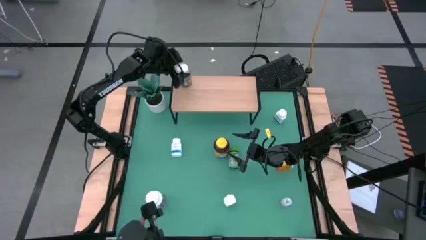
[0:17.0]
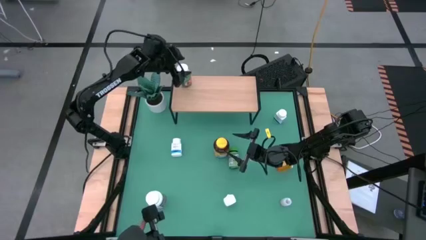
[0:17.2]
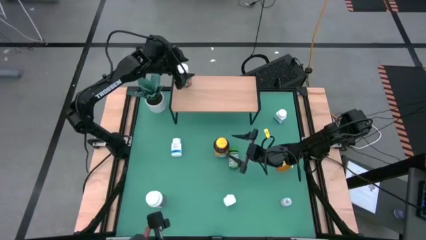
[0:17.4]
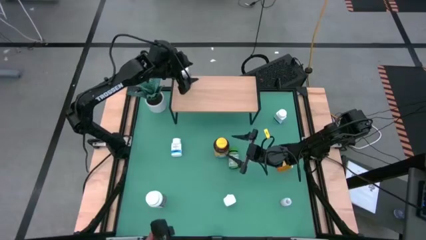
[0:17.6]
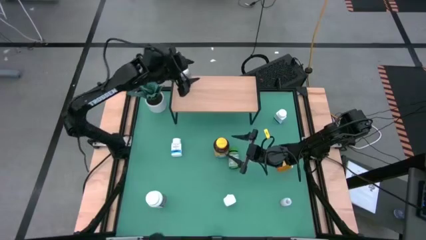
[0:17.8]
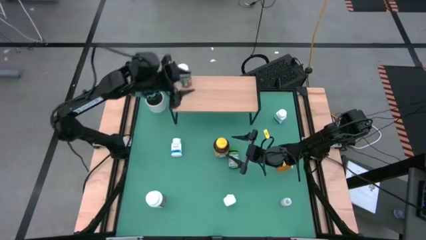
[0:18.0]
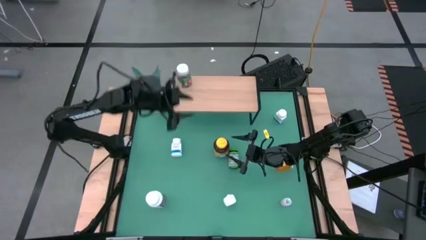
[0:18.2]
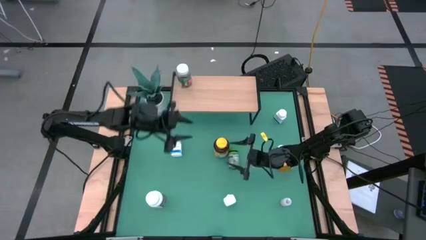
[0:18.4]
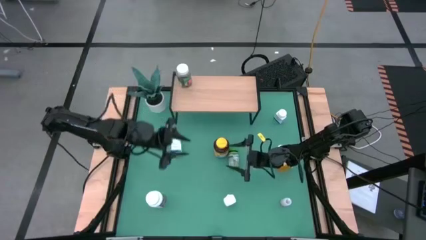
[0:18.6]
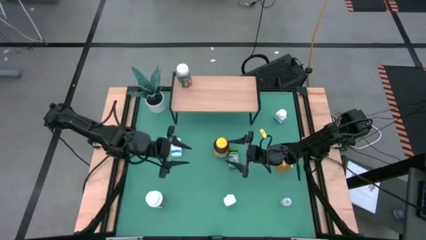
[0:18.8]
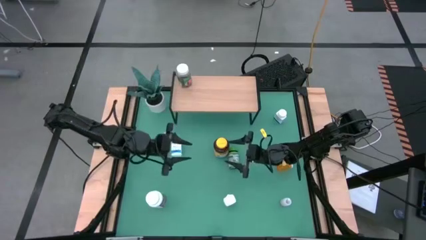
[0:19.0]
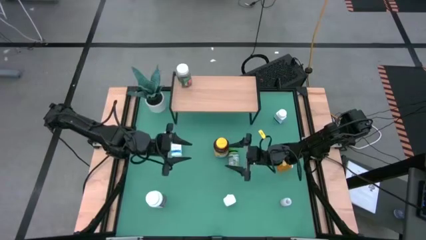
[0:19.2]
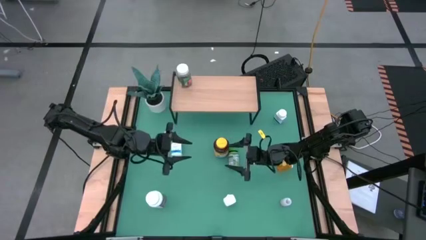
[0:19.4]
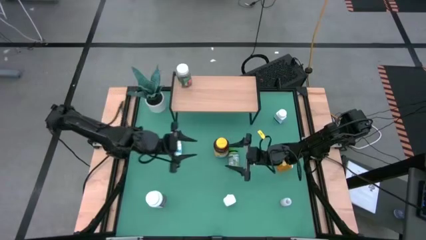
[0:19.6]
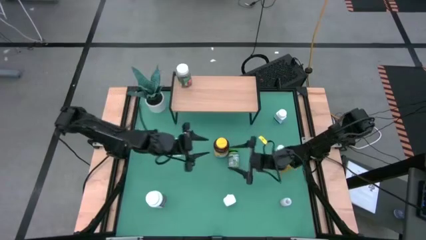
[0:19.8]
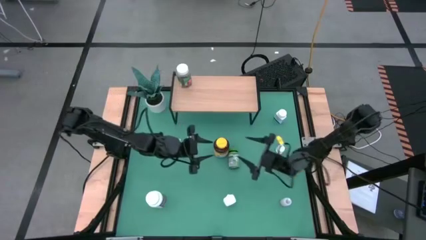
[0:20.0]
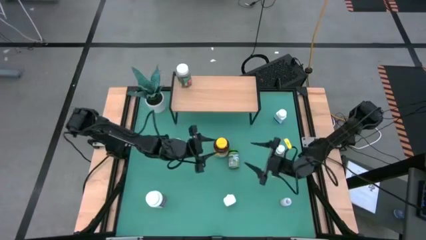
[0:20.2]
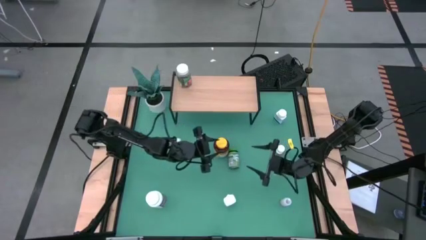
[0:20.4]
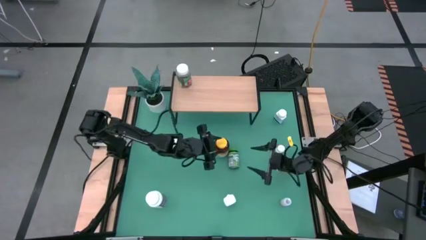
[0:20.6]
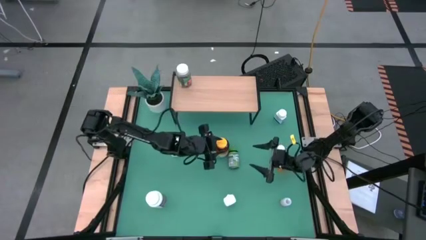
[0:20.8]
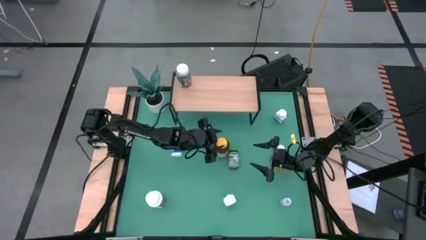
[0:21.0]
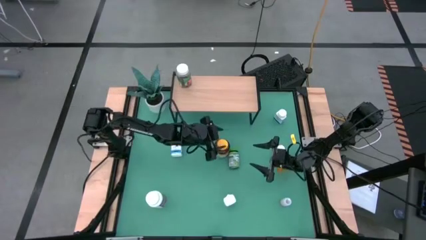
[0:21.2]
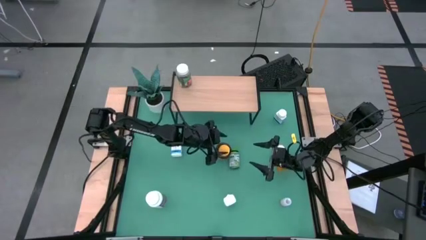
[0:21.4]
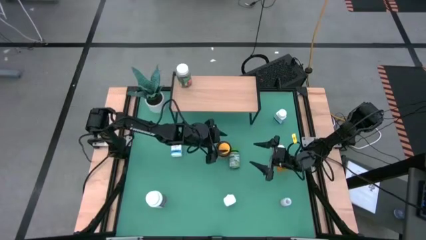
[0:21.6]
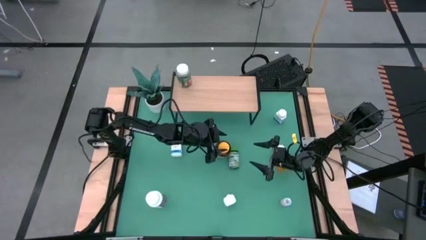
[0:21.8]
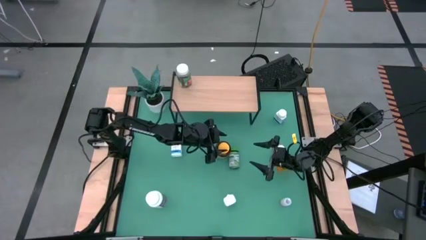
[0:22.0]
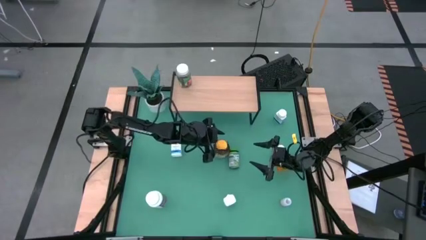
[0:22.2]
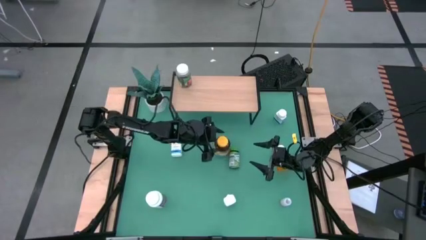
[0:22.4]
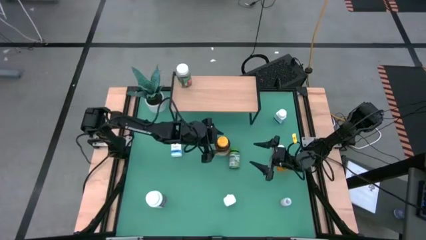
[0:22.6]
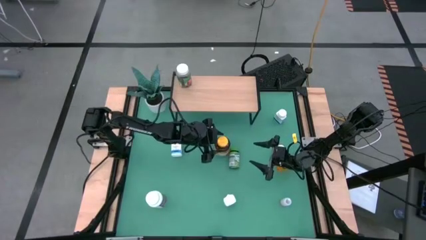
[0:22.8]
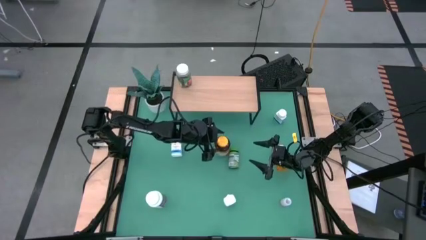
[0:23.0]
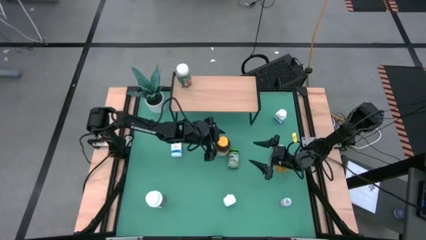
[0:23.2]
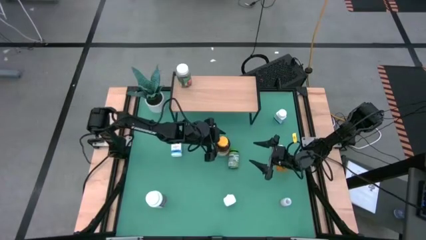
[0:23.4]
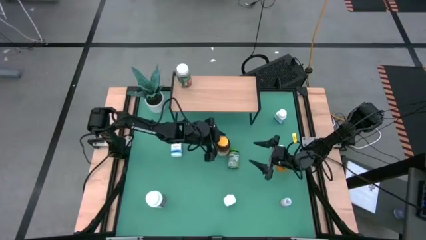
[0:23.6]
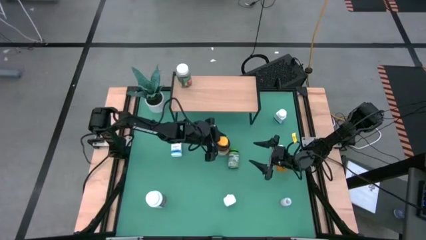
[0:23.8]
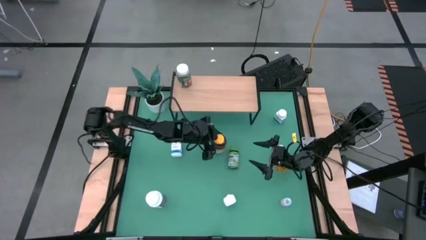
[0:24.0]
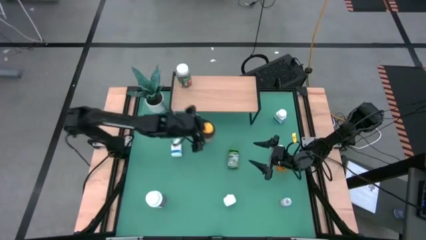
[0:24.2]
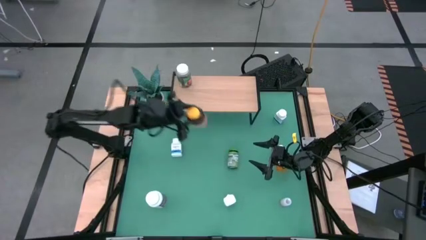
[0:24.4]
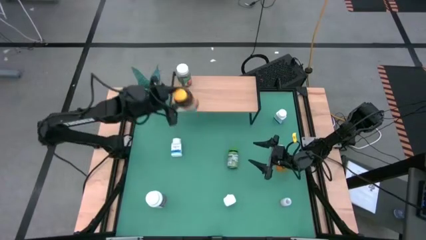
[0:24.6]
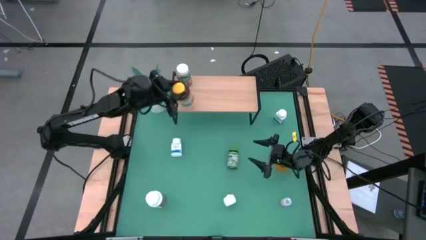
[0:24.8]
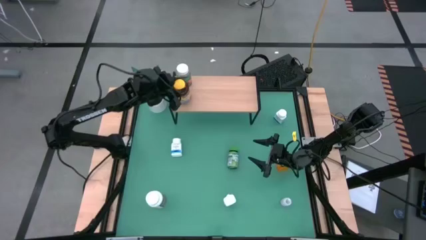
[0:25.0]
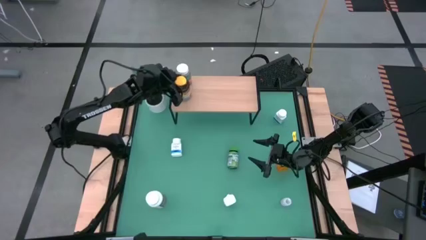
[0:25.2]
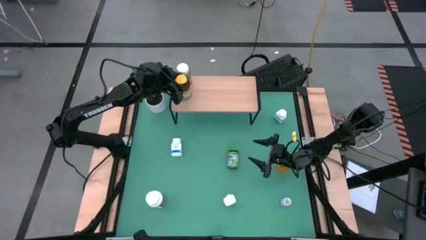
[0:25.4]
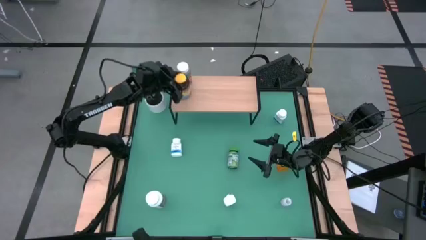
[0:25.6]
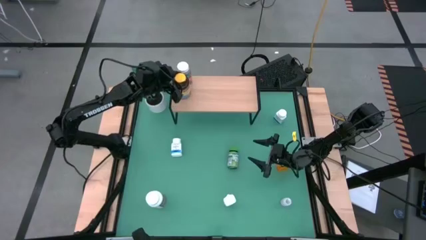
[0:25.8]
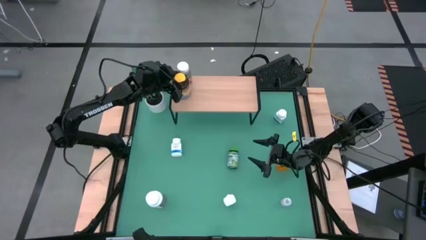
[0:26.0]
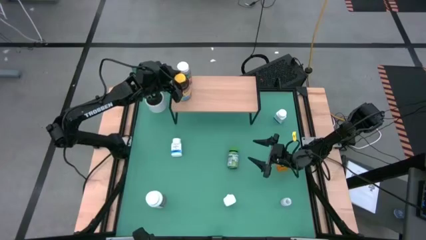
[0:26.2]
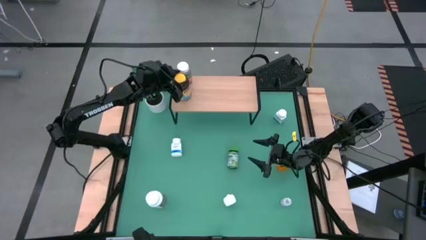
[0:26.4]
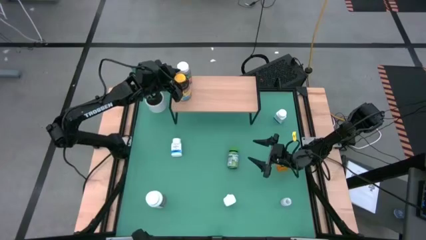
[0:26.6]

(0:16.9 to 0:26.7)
Task: Pick and place medicine bottles onto shelf by color
Put the yellow pill bottle on the shelf
